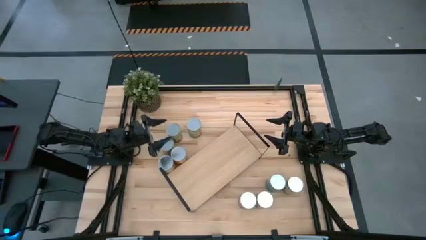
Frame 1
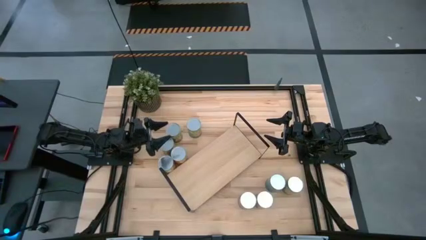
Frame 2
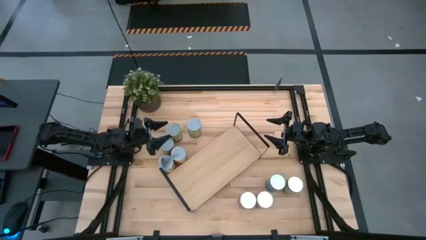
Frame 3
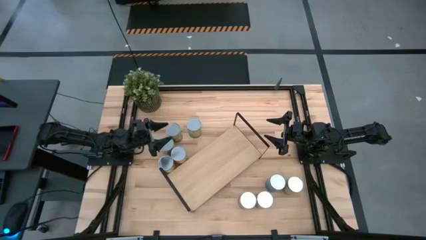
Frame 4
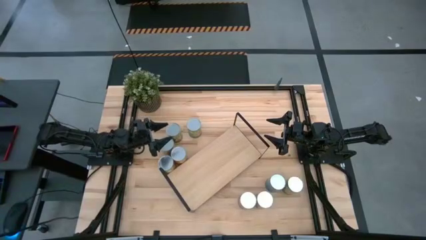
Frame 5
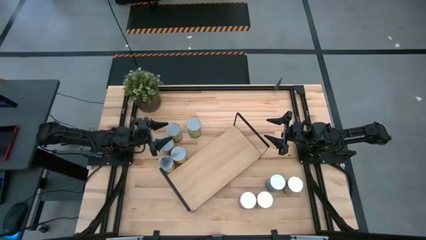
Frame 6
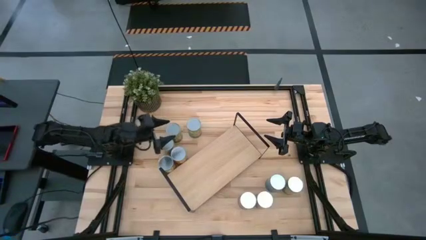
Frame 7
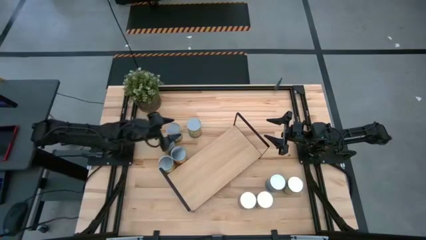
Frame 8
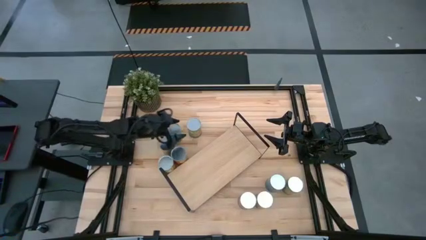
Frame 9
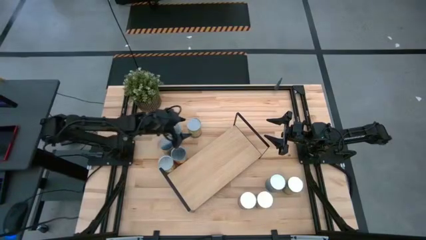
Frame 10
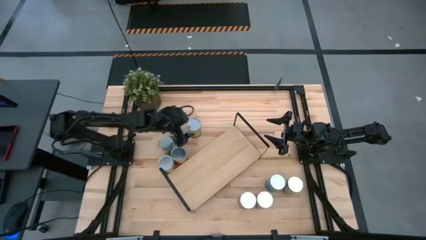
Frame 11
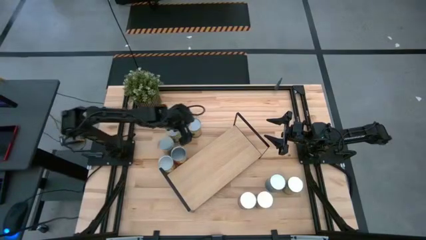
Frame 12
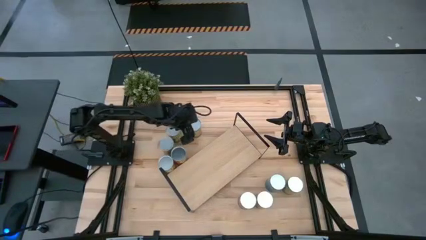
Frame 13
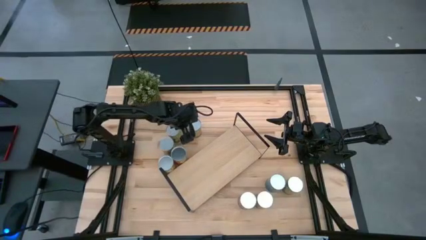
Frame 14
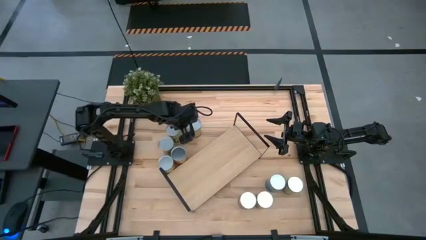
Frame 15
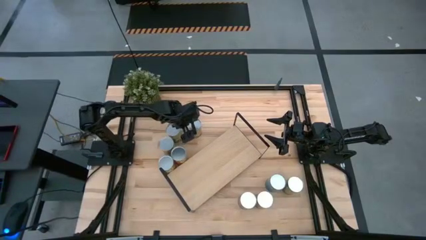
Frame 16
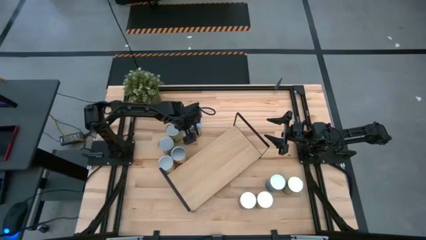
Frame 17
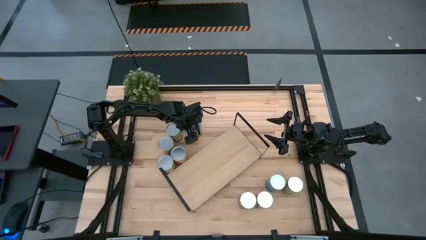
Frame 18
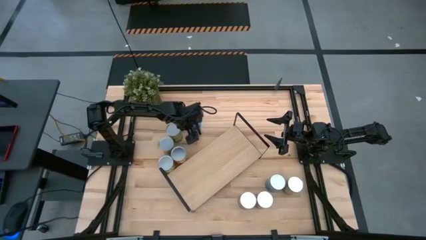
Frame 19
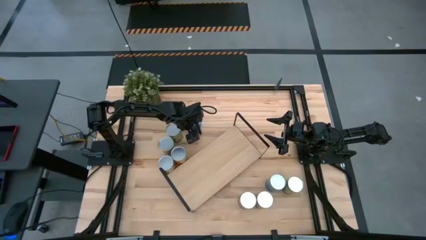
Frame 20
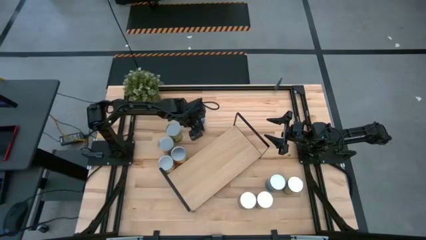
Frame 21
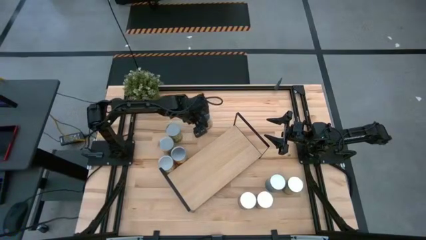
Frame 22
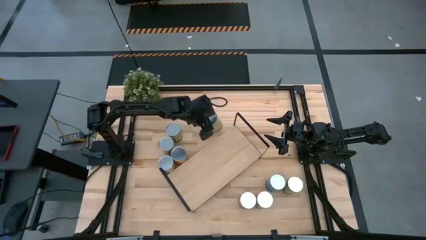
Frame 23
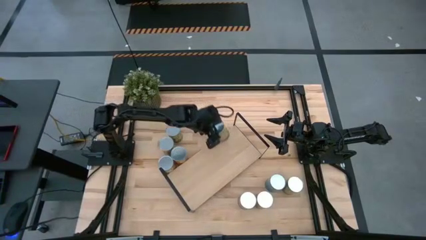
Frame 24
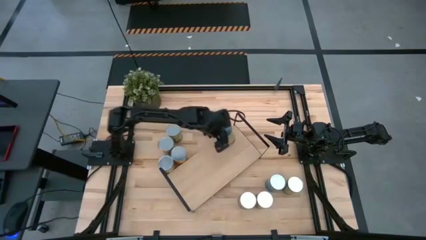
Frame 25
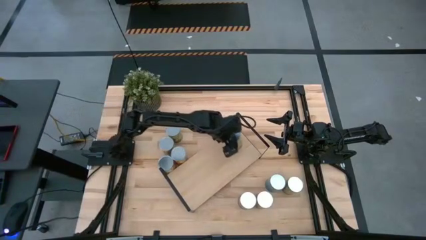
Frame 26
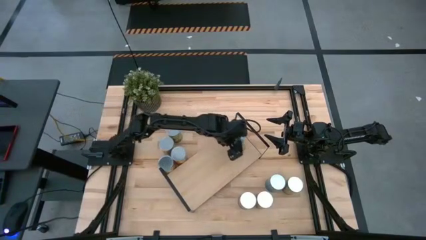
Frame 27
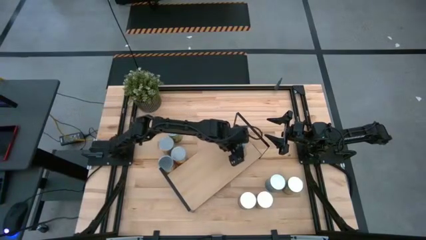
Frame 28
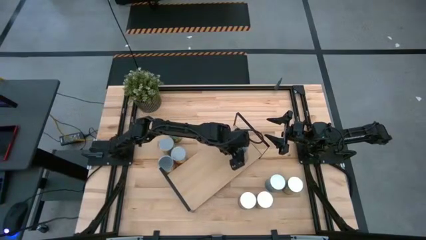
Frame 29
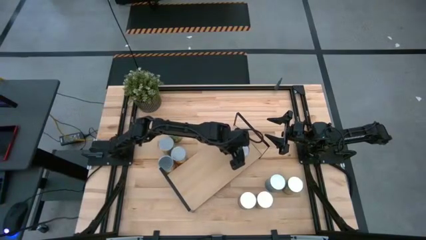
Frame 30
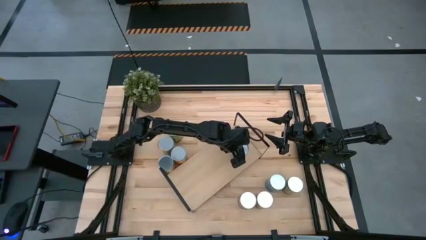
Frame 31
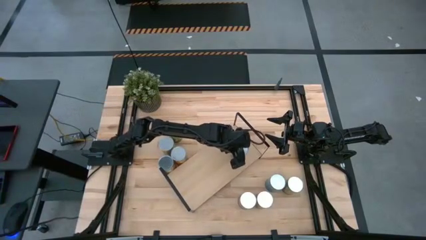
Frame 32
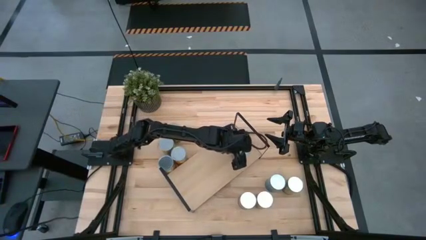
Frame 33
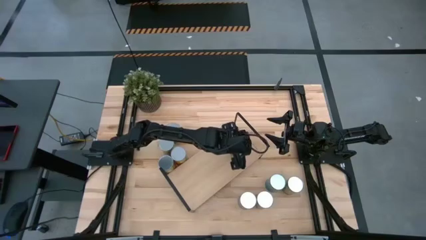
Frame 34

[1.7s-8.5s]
Task: Pick and place cans onto a shelf
Put the right canned oranges on the shelf

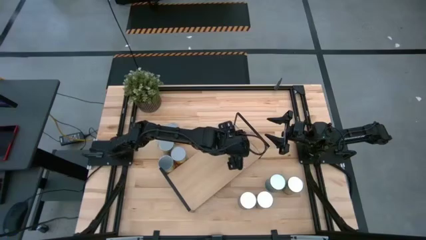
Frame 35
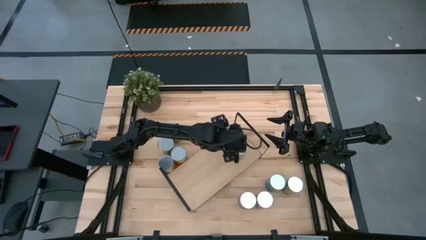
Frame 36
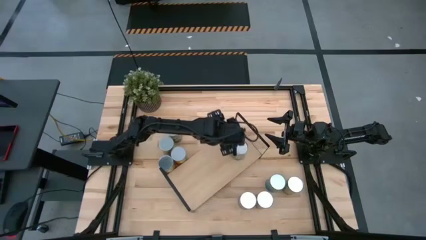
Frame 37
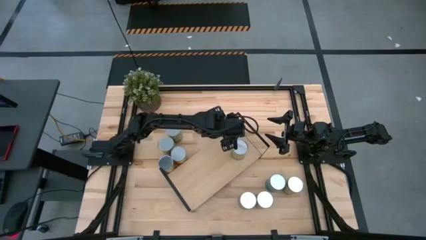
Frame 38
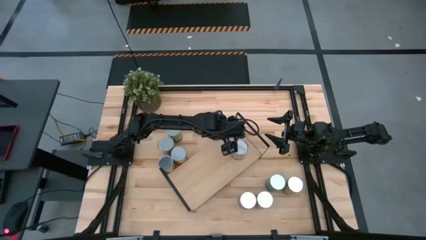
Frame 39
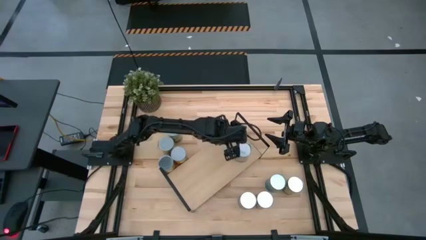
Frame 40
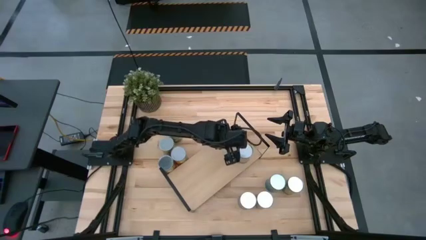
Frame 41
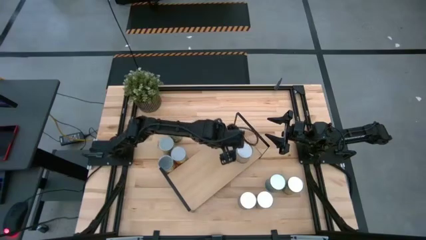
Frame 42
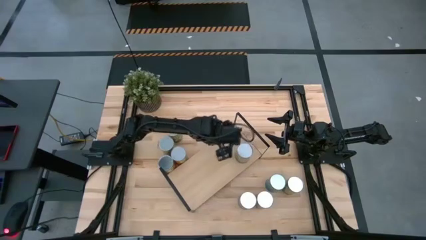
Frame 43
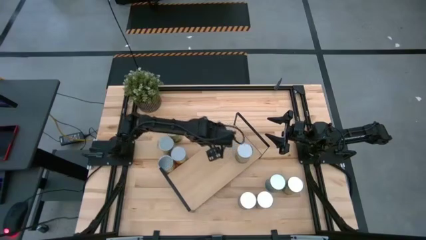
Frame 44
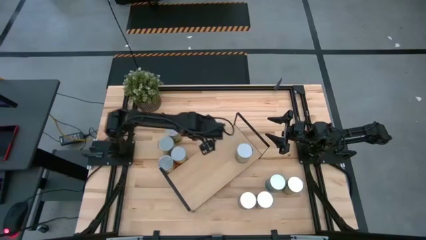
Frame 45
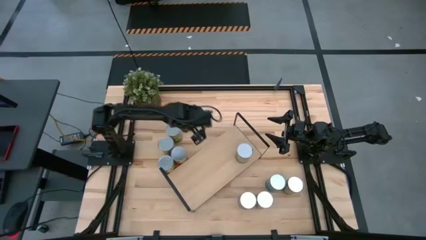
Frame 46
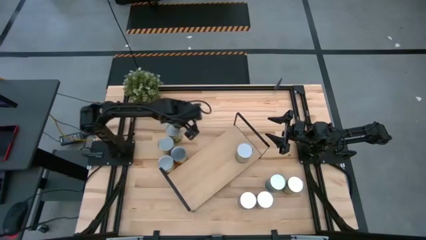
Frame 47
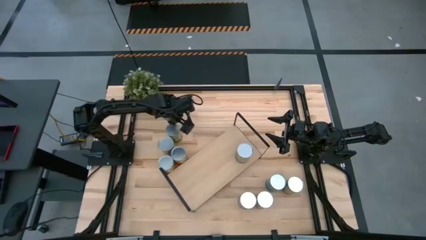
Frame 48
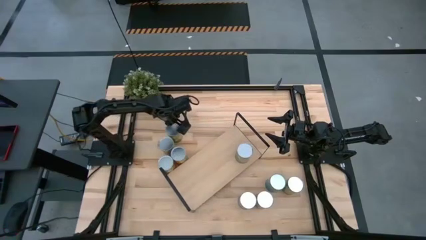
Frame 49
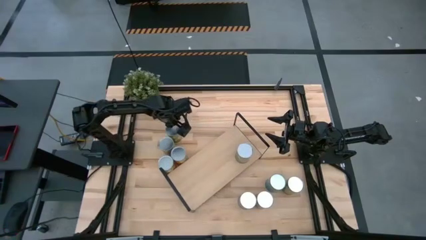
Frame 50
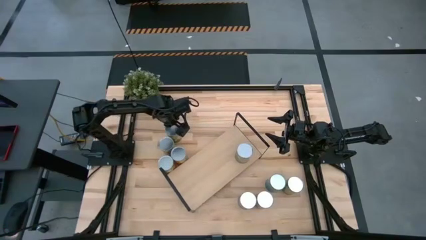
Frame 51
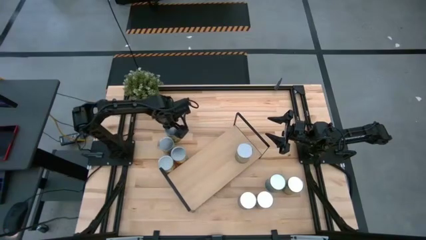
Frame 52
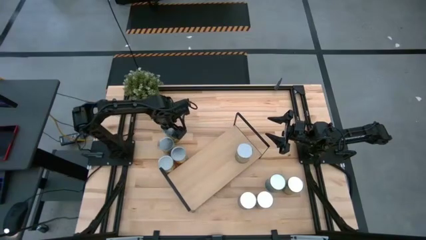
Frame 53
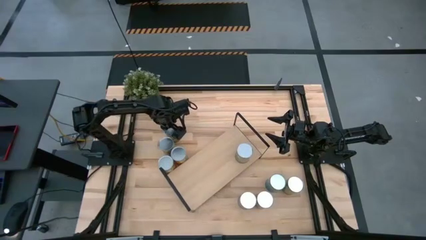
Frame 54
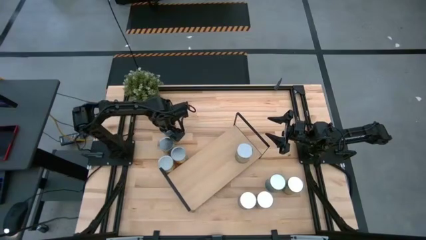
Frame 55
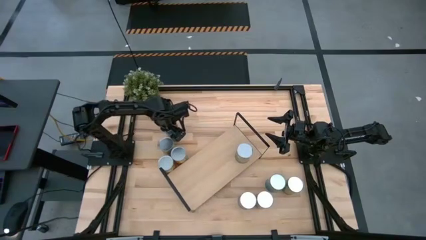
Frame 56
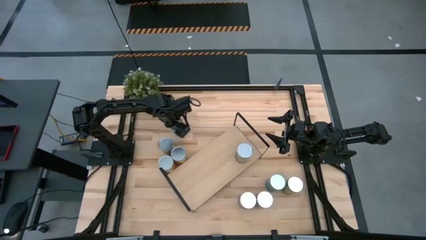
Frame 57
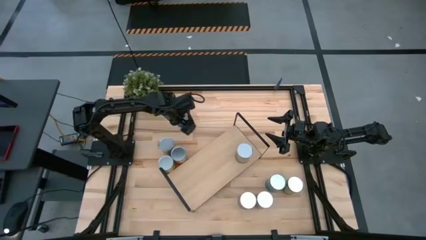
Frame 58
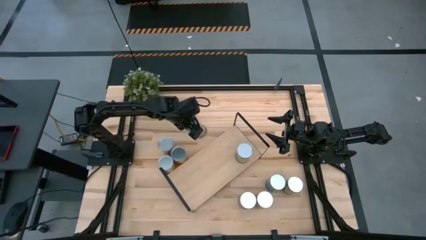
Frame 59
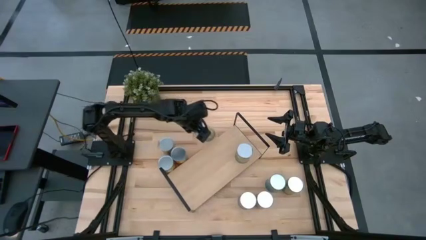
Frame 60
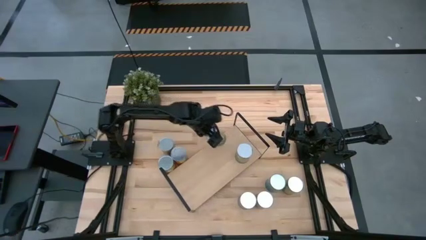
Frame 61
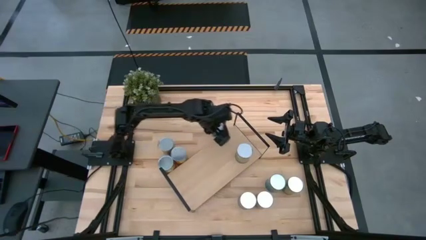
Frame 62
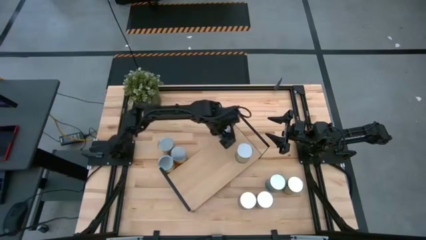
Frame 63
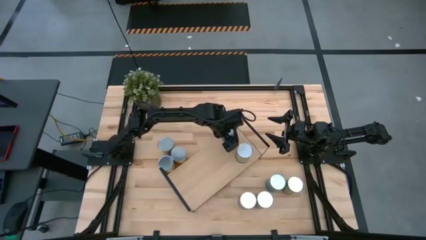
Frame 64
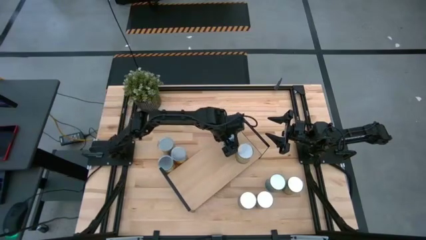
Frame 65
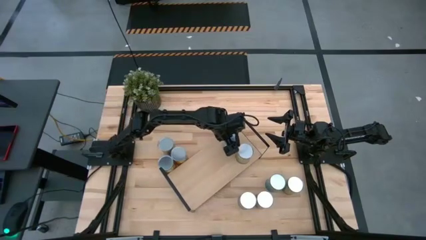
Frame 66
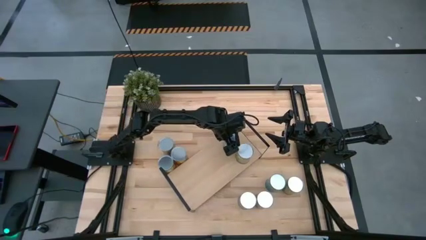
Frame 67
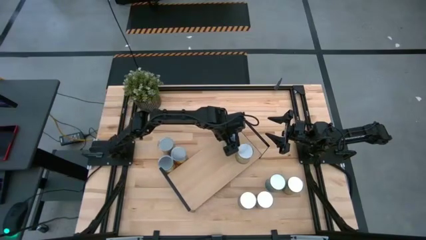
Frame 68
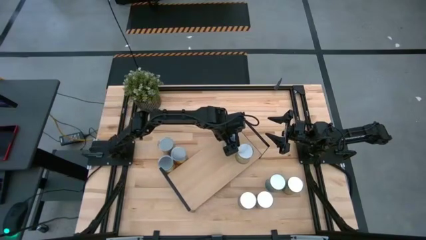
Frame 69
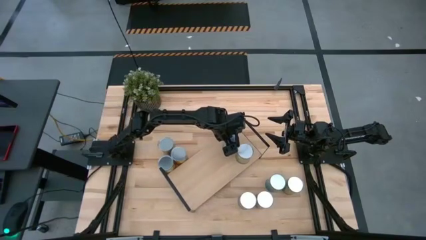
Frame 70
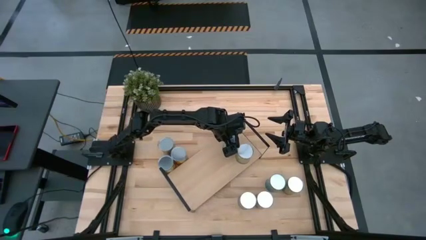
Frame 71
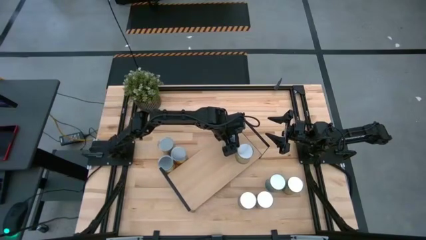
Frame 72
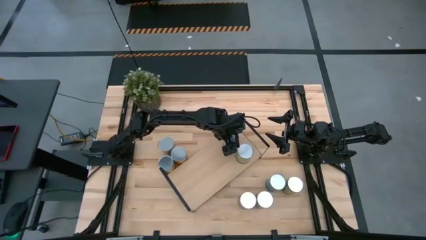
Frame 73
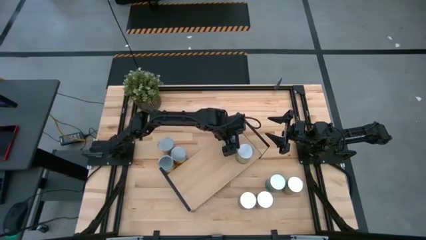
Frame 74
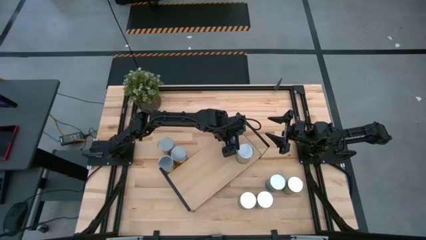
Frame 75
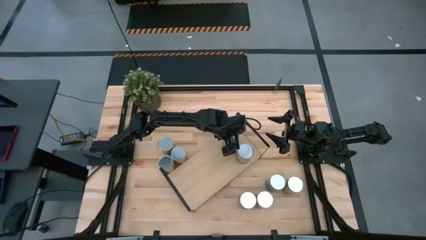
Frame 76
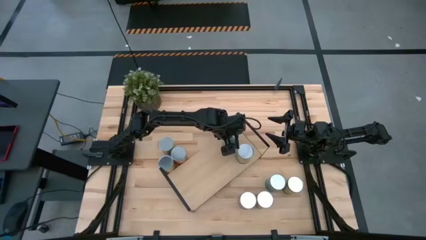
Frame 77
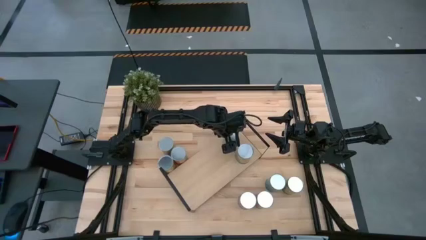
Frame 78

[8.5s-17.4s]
Put the canned pears on the shelf
